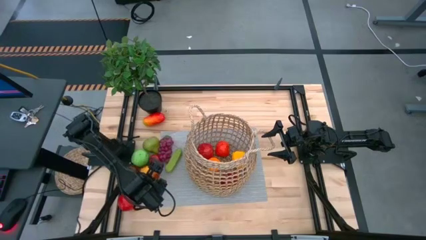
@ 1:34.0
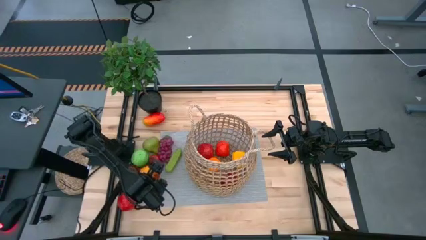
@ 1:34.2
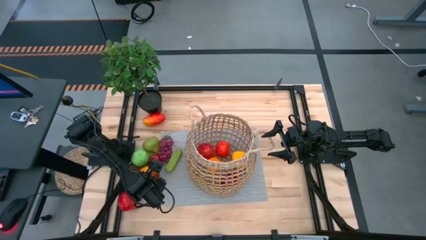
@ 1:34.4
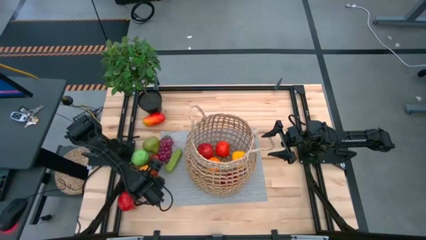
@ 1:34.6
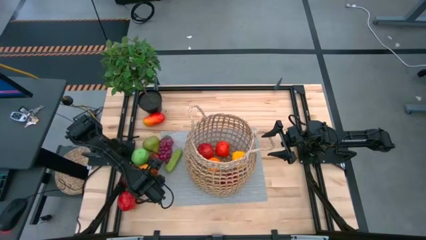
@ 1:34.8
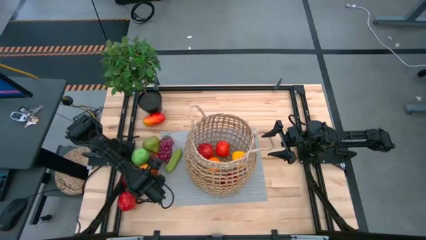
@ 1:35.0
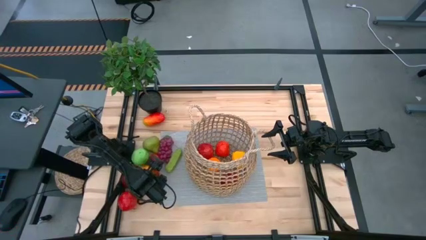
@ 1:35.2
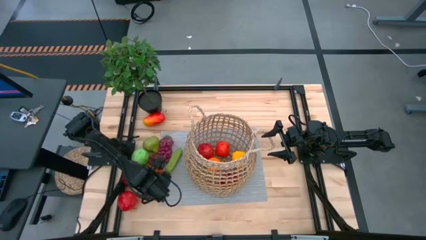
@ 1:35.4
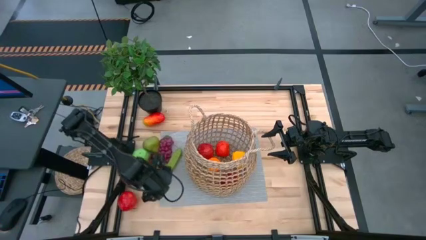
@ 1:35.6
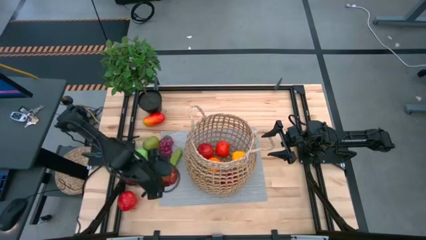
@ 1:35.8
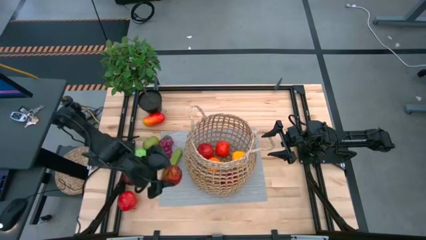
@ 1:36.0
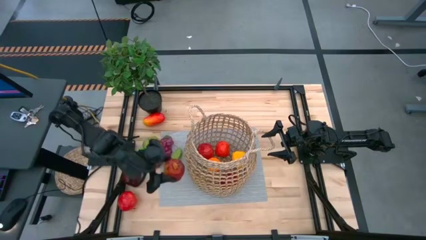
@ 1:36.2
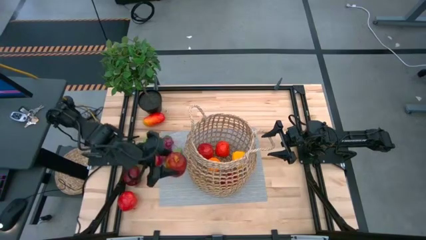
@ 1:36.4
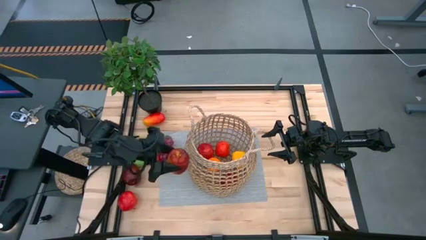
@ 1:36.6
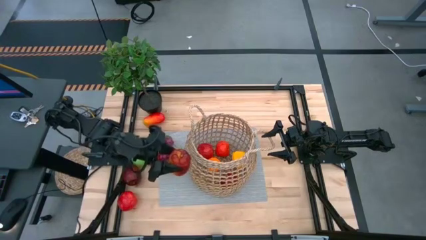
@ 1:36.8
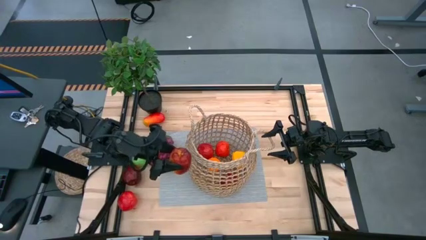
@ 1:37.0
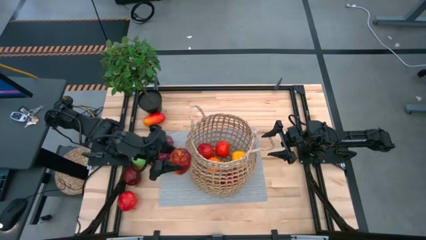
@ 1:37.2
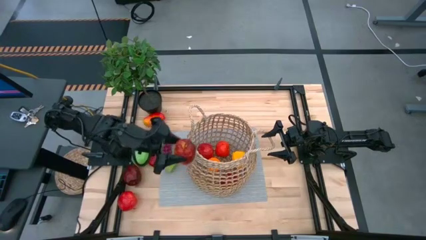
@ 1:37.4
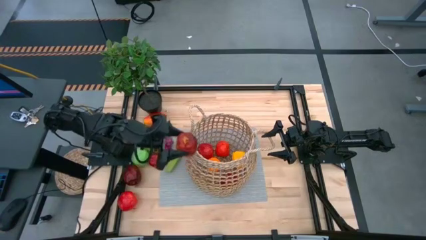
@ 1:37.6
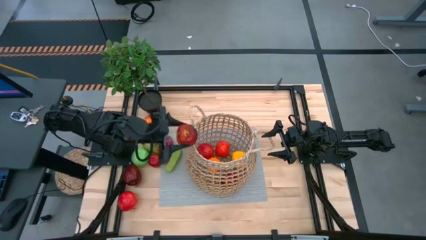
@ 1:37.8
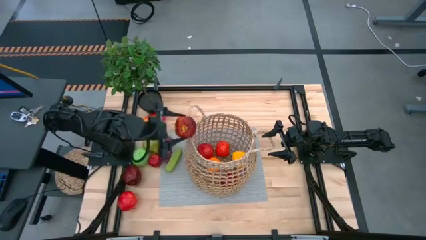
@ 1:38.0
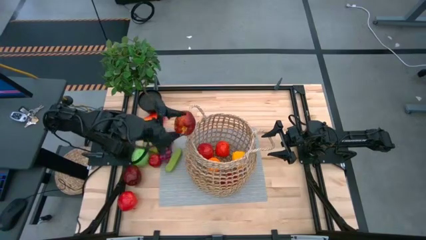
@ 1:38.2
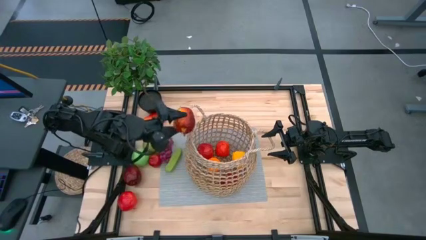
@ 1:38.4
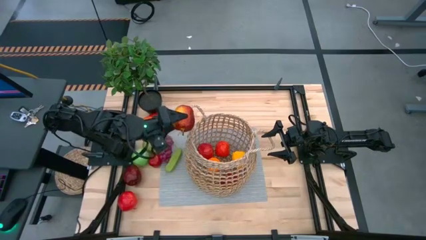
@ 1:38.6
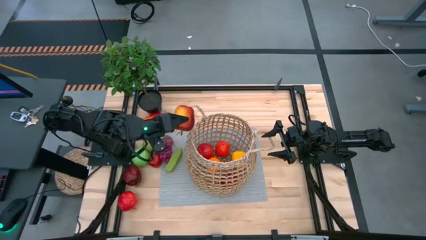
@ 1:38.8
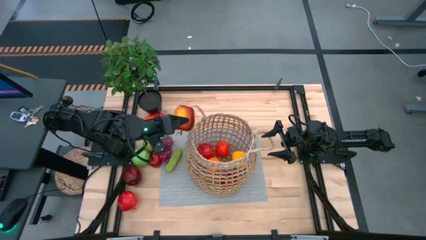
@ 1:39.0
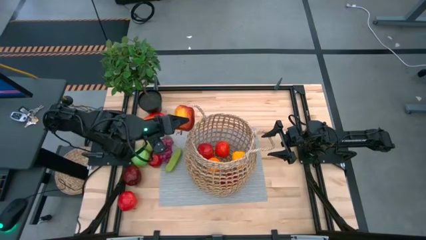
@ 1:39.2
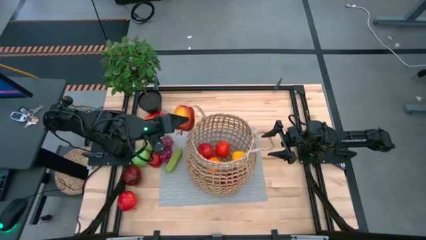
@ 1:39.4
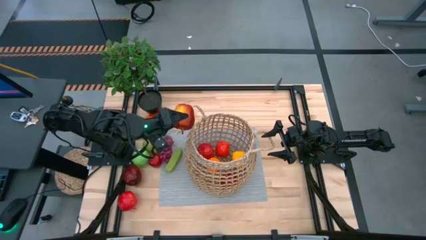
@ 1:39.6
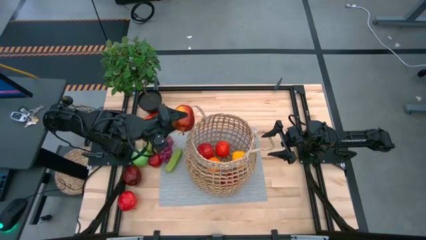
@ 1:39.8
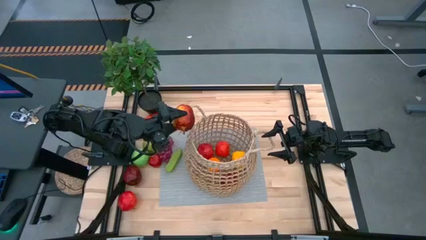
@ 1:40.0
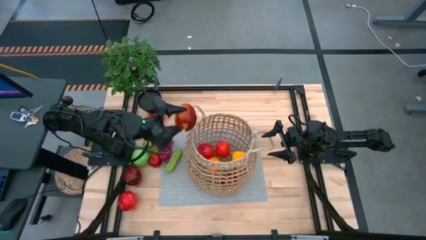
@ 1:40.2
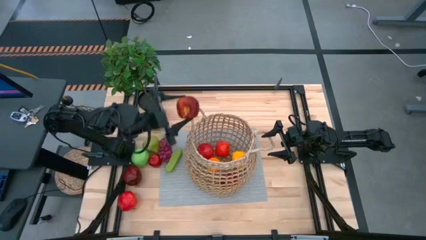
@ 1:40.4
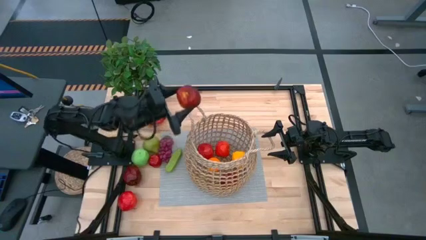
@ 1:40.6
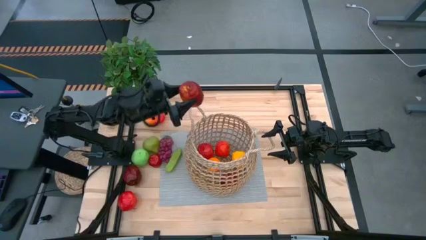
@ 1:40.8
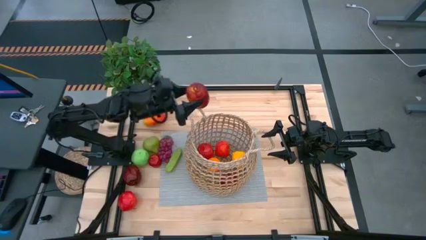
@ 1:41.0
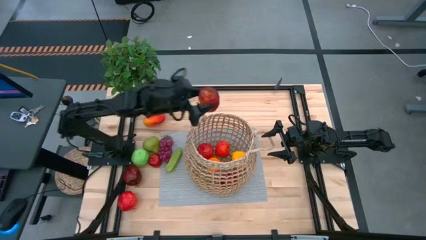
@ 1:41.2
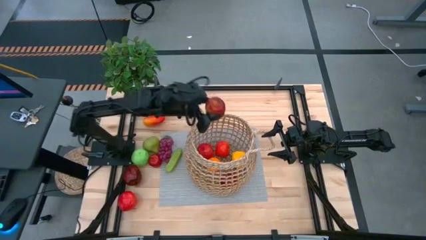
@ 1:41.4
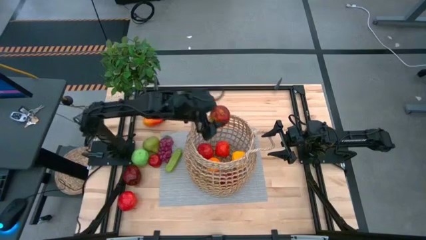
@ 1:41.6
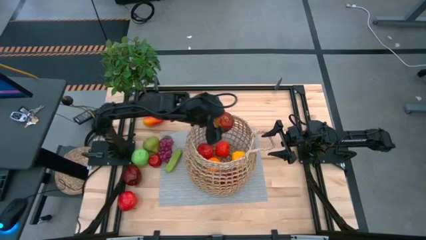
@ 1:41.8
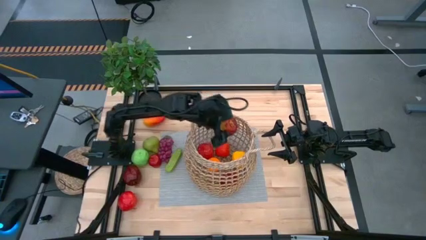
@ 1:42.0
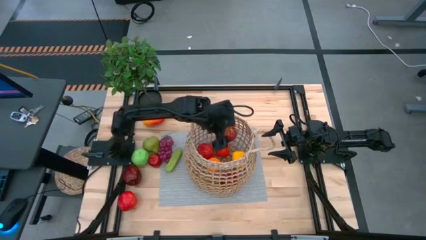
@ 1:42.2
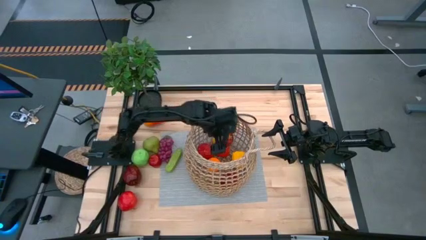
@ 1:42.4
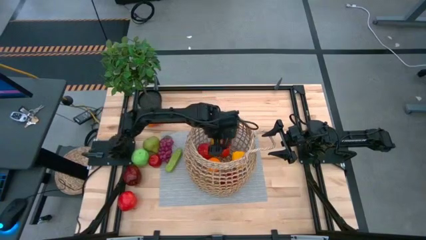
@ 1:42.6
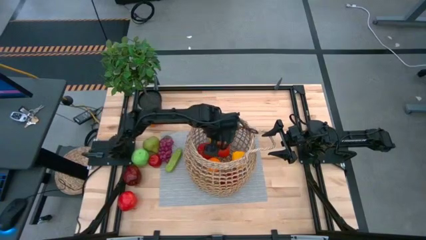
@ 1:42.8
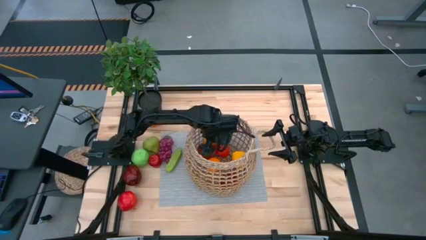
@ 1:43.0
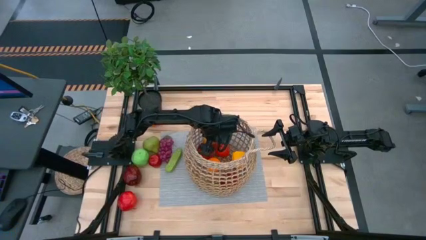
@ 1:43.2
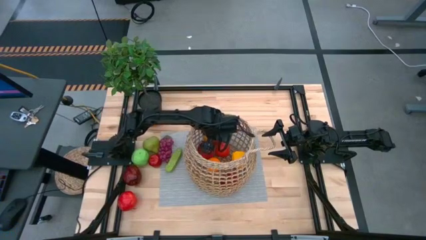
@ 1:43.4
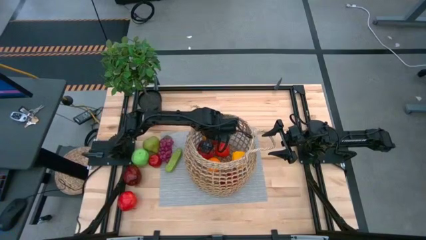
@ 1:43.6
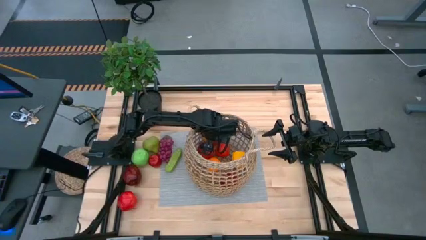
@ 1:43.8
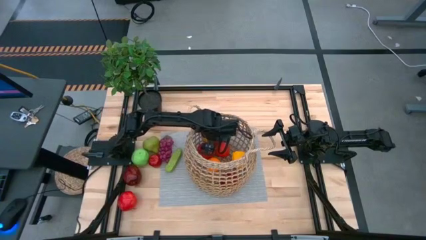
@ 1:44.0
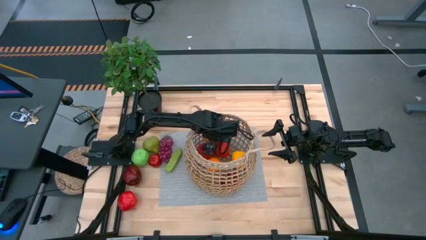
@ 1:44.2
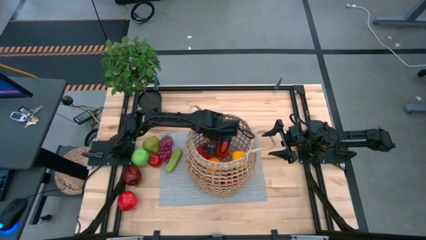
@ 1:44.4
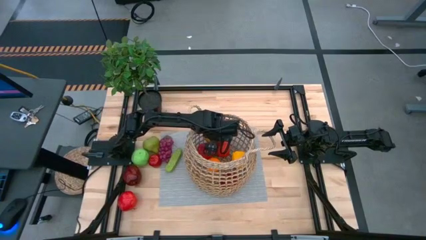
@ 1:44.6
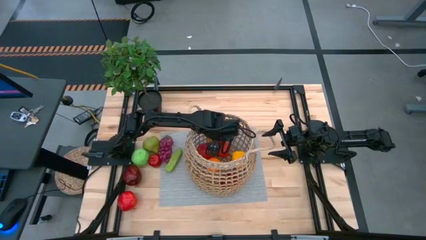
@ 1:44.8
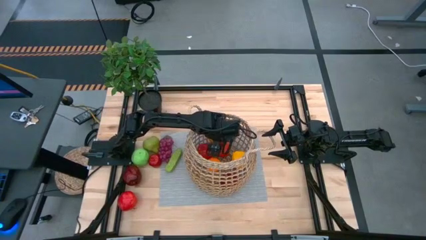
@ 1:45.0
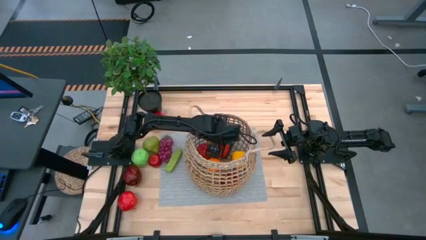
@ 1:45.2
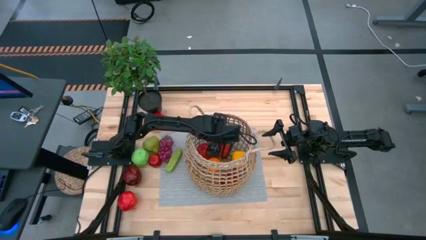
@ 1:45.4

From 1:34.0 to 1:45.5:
Task: Build produce basket
Put the red apple into the brown basket

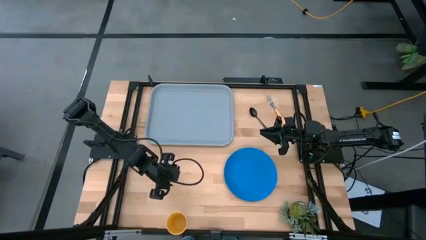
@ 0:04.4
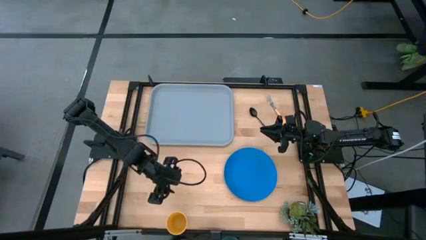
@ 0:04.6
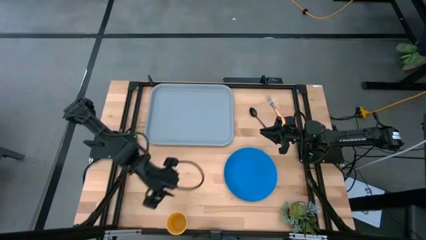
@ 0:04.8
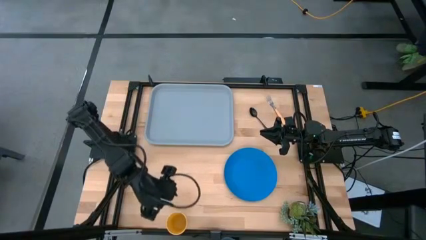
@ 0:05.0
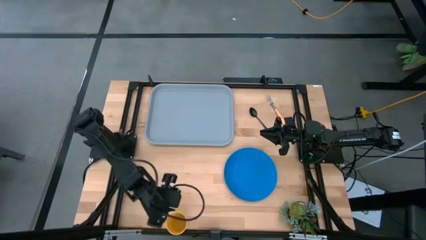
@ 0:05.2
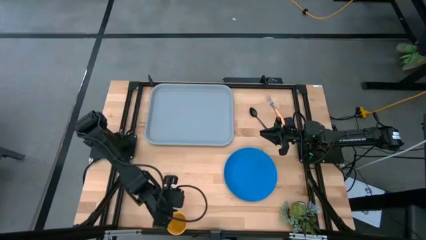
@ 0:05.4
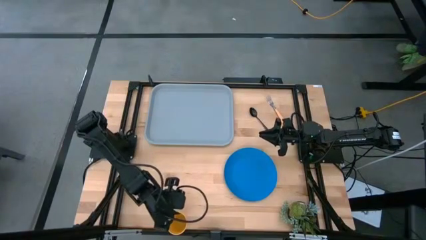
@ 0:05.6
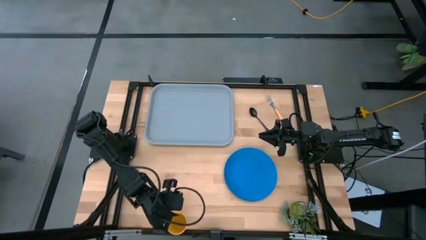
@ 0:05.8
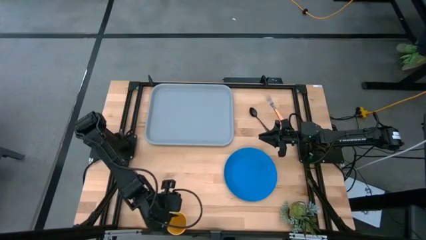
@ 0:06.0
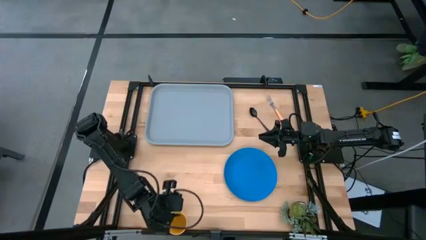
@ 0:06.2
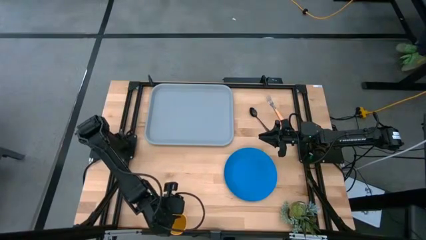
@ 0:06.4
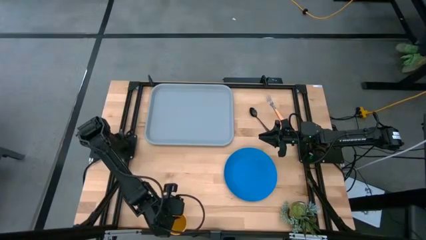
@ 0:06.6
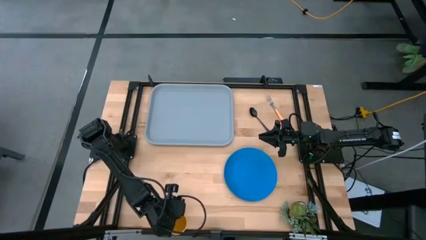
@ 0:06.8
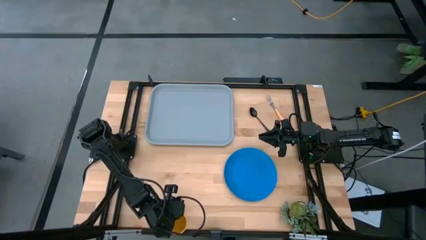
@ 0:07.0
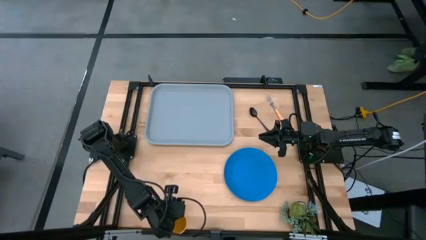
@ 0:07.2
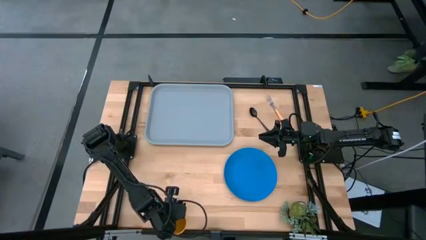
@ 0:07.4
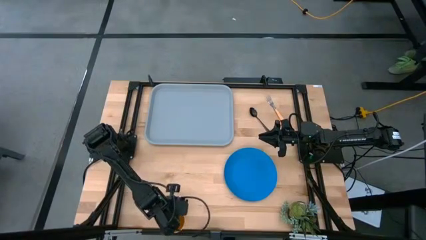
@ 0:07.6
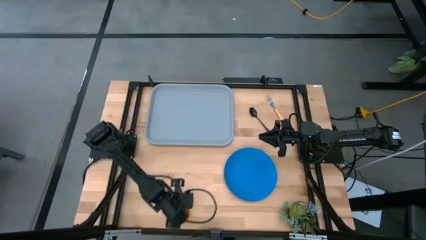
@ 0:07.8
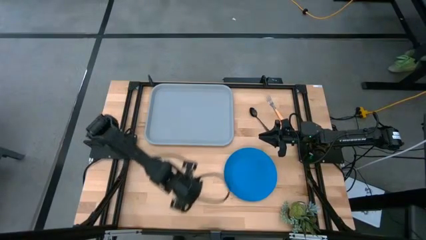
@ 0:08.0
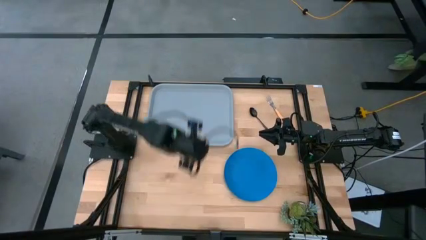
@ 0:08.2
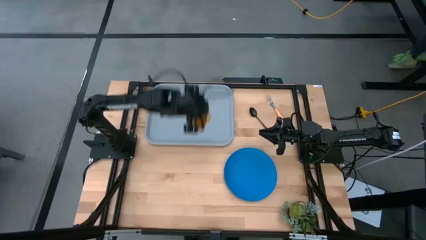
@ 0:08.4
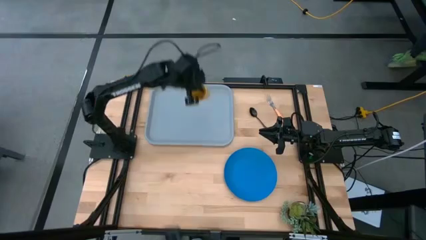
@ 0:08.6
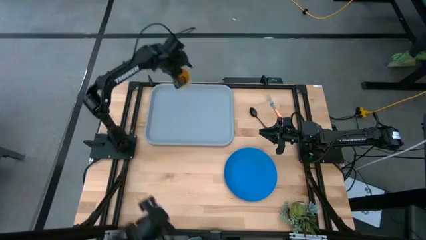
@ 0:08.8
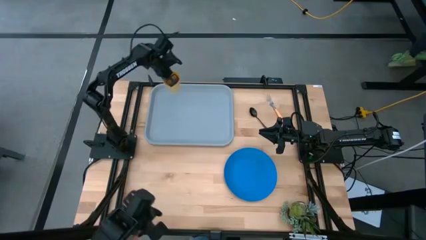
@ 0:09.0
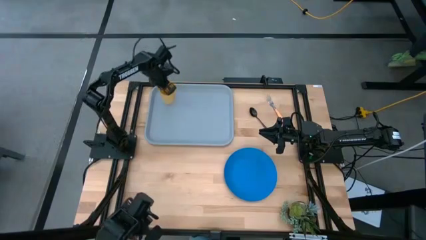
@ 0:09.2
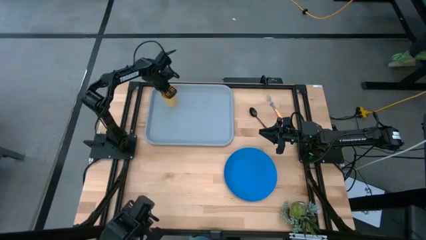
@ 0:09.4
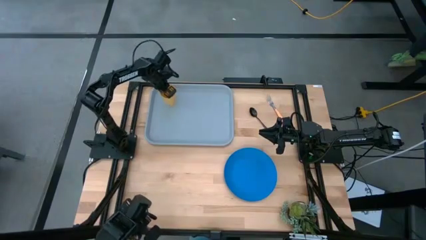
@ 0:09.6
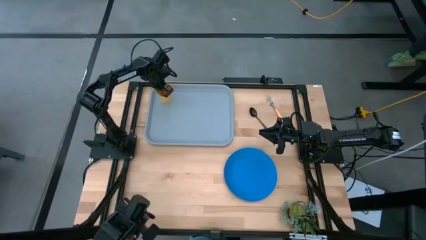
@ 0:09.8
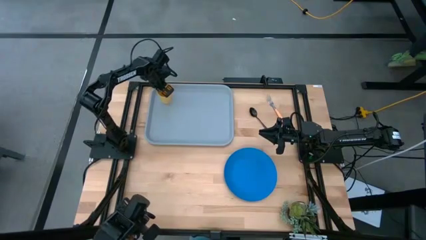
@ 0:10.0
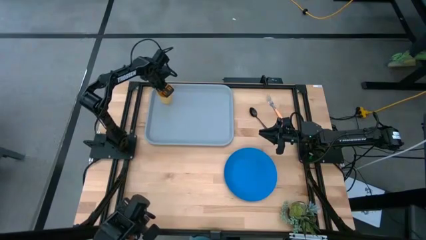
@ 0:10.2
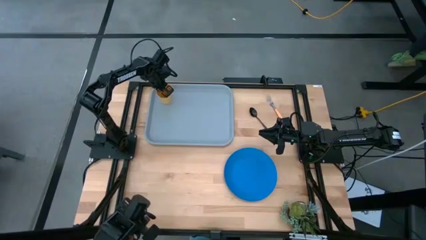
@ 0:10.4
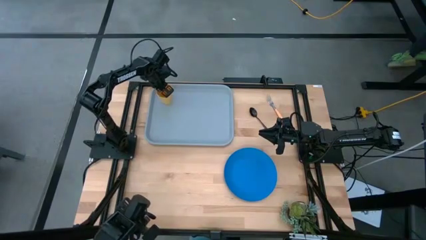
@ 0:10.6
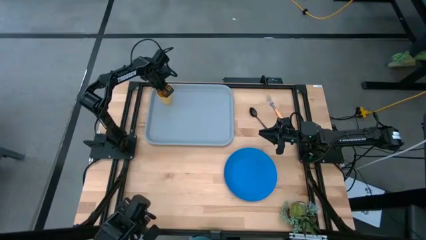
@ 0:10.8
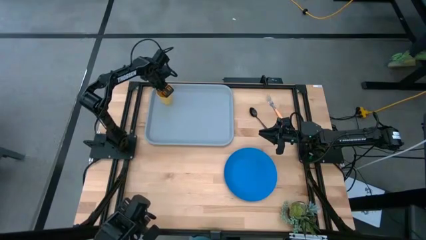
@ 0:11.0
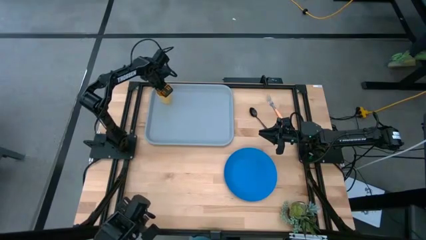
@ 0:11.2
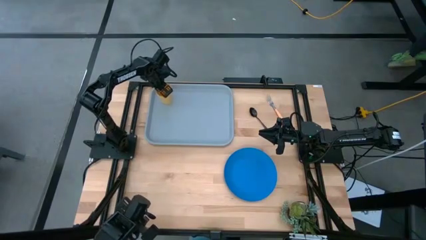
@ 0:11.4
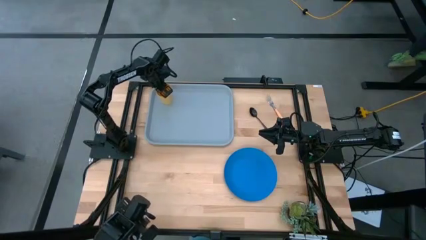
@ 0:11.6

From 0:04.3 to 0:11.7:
Task: Pick and place plate/cup/fork/spoon on tray
Put the yellow cup on the gray tray
